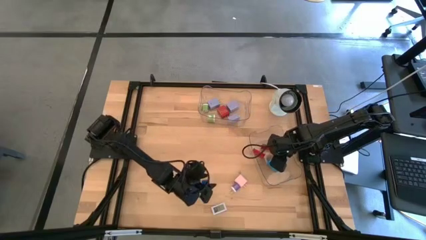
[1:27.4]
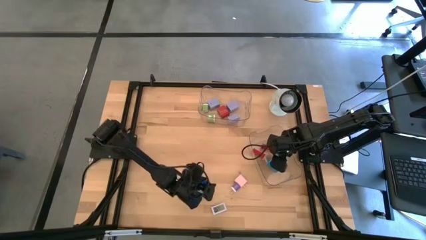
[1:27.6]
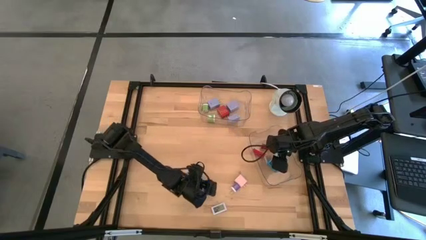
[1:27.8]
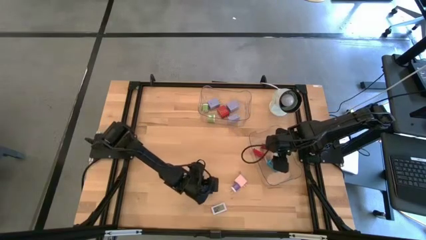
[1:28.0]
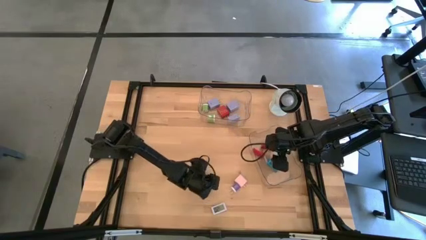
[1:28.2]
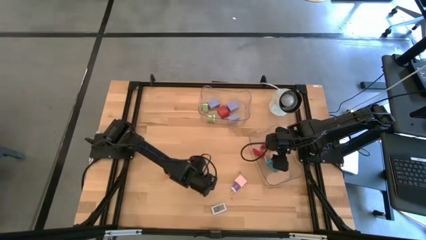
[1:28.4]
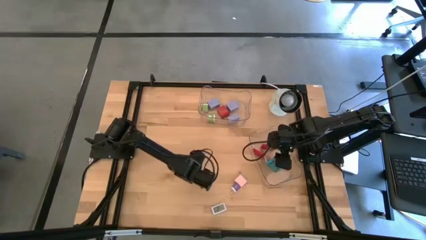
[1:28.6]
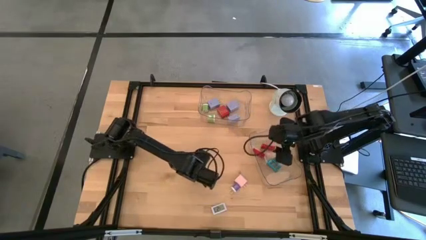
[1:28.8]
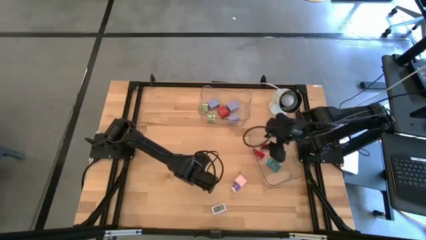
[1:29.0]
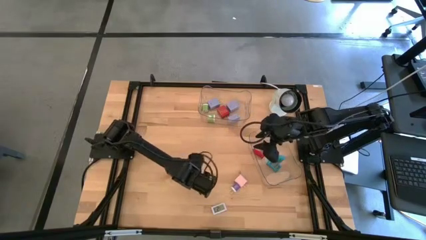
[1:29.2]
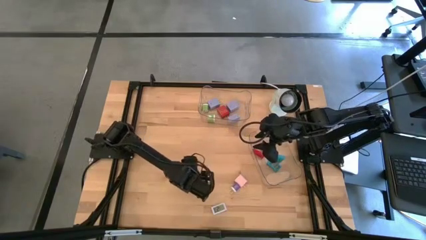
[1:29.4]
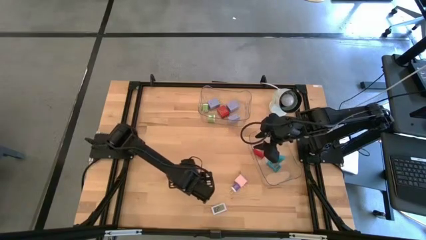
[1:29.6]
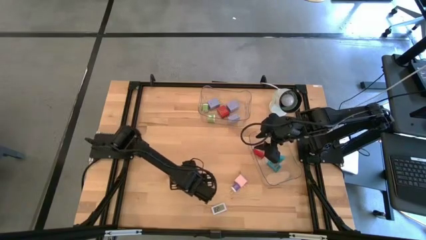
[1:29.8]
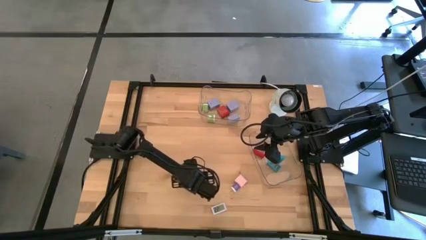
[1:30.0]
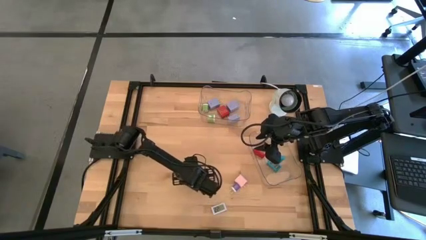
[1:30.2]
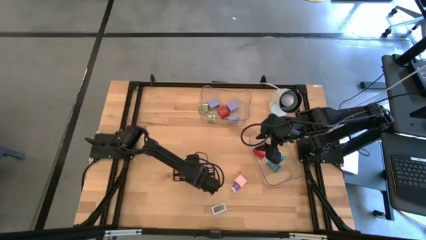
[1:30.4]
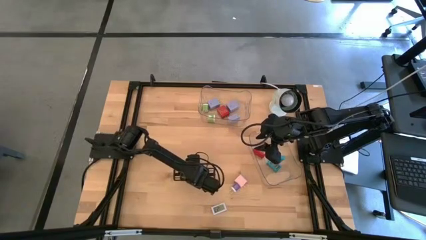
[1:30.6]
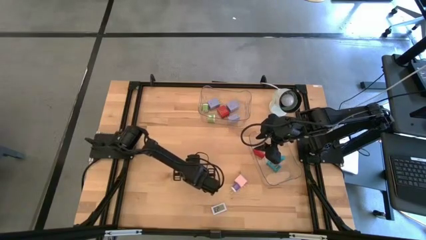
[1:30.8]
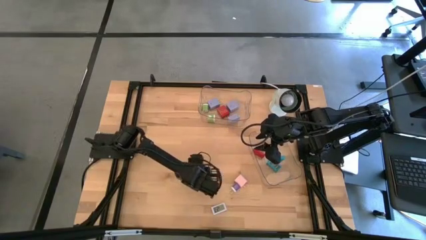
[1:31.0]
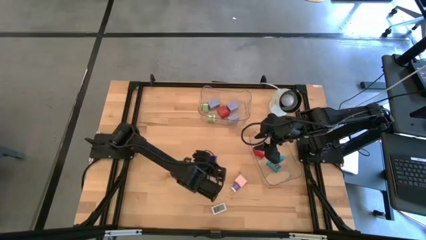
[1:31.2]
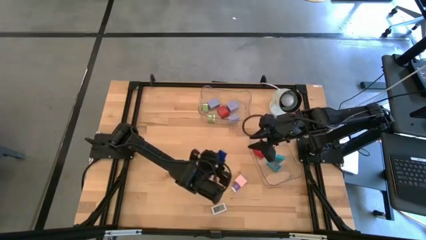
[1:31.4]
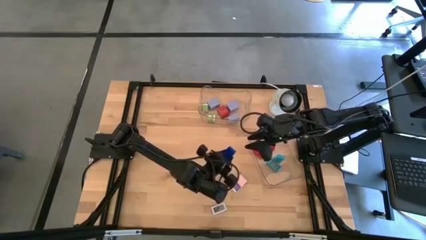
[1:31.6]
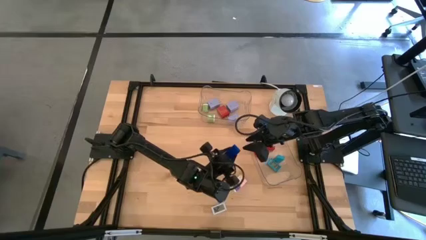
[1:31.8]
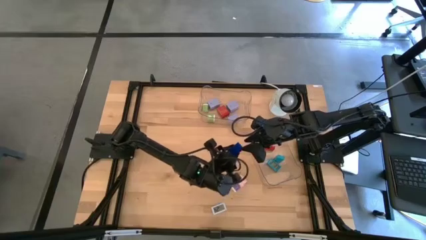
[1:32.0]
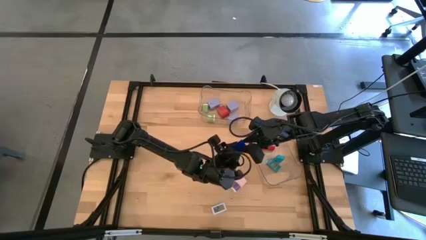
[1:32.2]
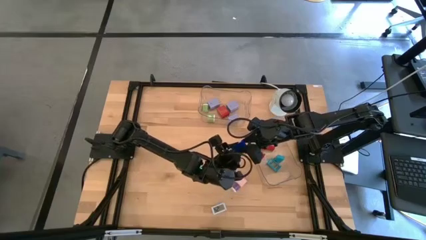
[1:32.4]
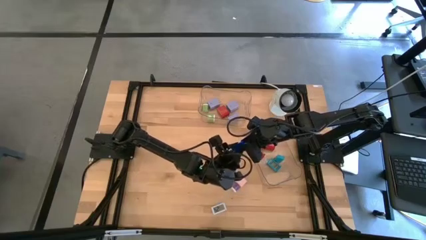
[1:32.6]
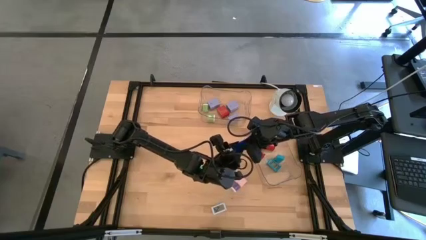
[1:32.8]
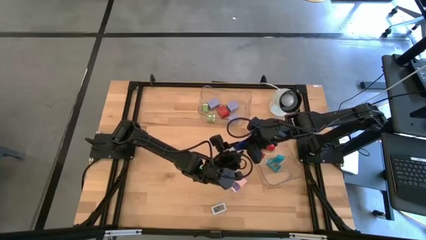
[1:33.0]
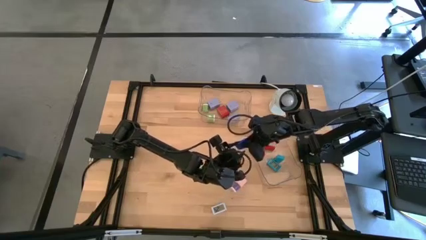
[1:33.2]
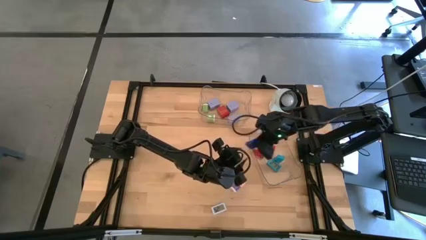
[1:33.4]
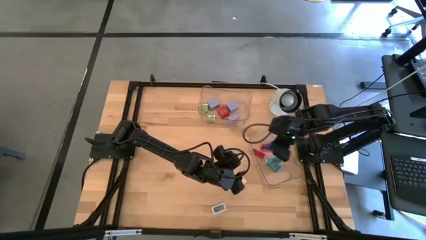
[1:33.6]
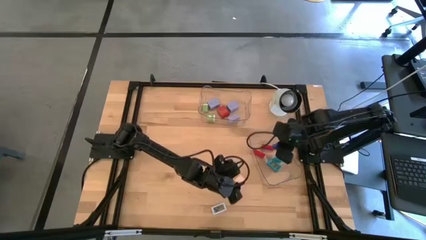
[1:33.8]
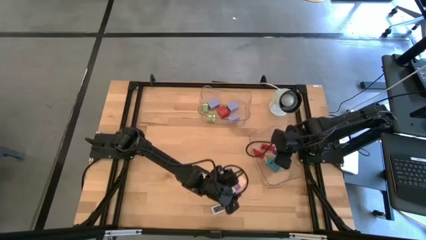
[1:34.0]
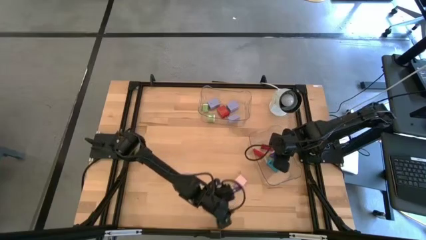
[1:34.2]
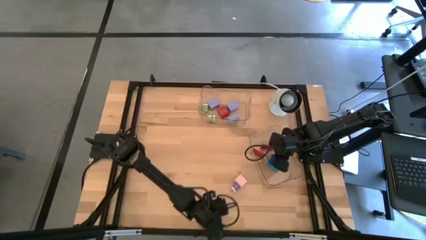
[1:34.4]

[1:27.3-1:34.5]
Task: Pick & Place Office items
Put the blue digital clock into the bottom transparent bin

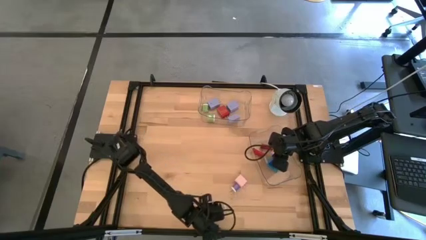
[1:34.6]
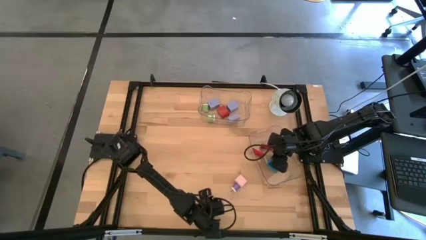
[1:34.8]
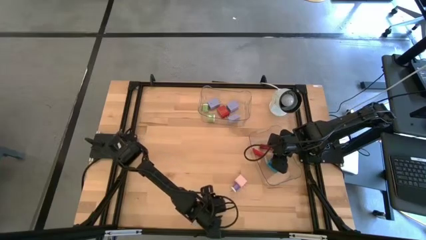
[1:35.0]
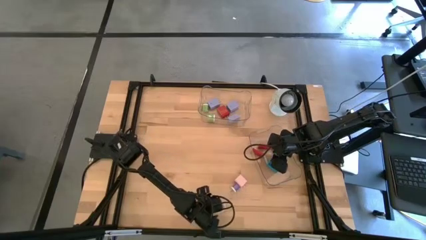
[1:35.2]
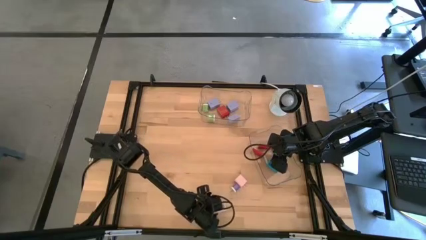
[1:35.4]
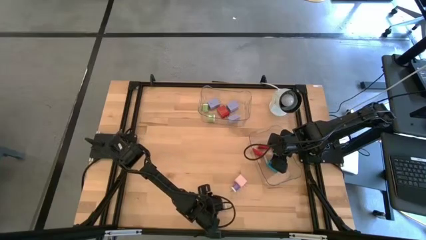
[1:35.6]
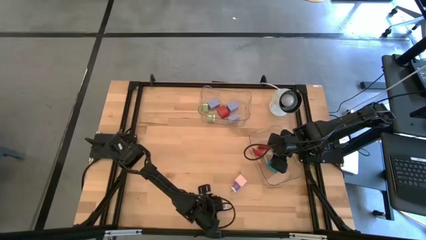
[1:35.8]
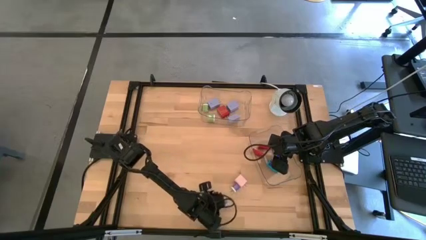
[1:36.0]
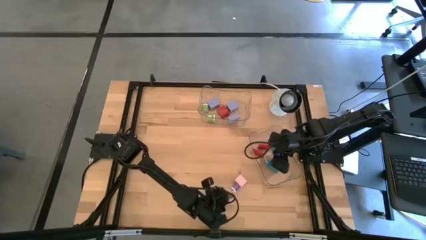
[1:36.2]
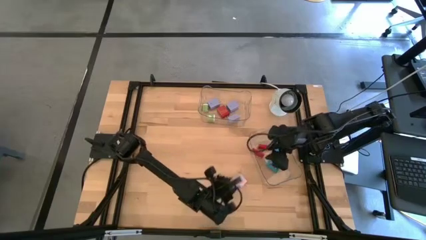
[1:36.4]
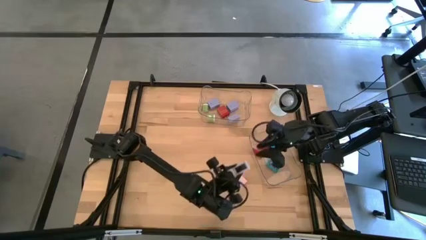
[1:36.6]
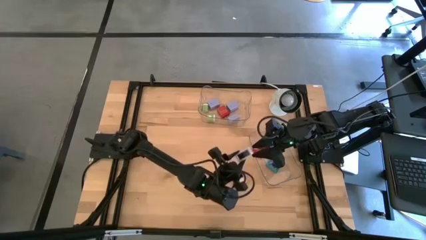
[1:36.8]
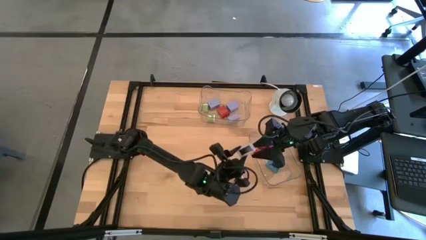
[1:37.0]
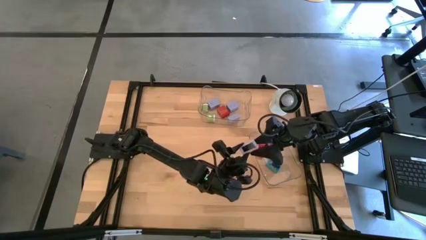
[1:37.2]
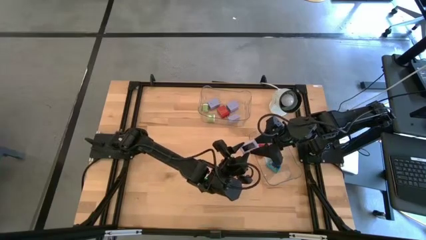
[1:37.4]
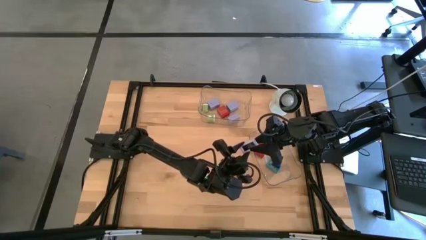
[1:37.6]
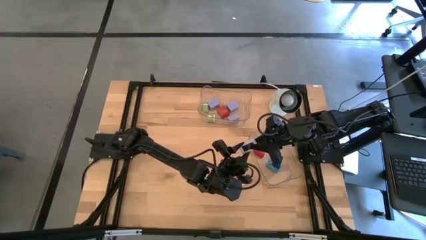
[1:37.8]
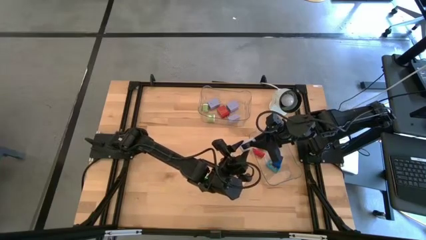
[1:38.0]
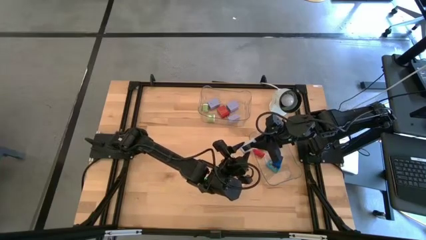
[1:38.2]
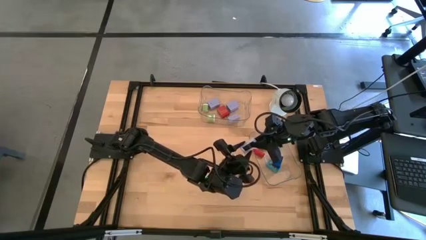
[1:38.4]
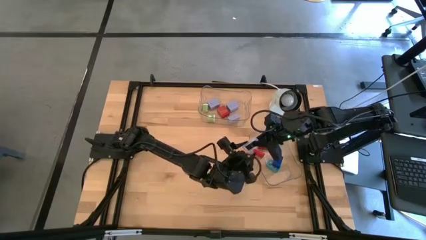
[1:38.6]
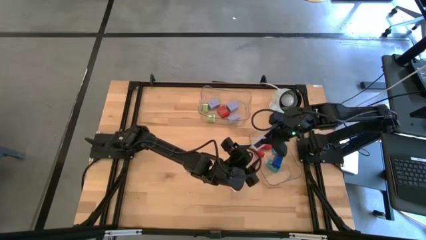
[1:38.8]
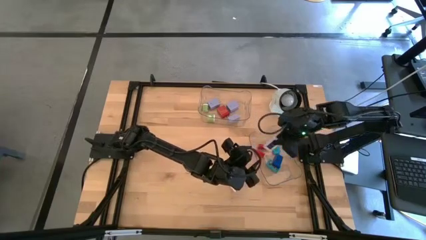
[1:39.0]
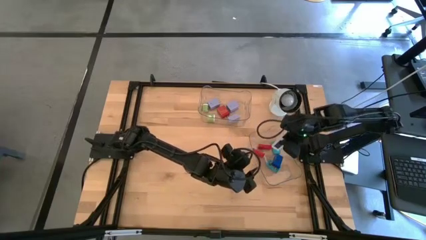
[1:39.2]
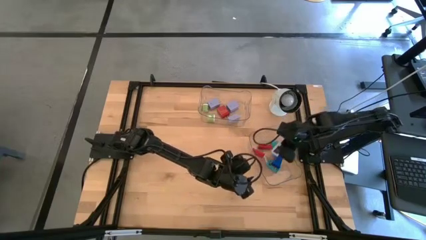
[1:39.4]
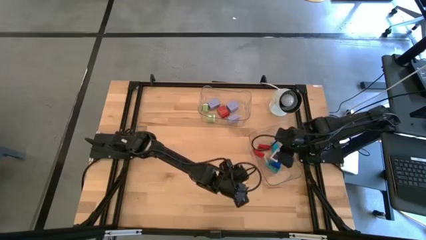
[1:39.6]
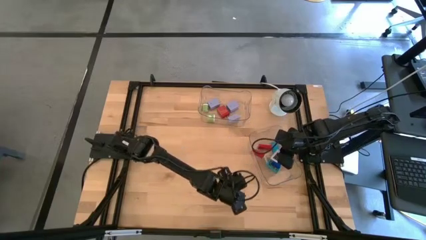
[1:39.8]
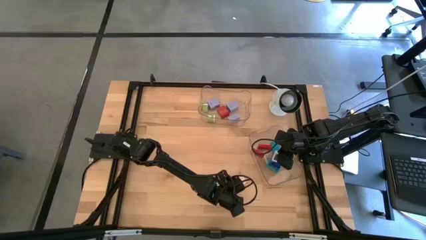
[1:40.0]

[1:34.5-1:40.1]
Put the white digital clock into the bottom transparent bin

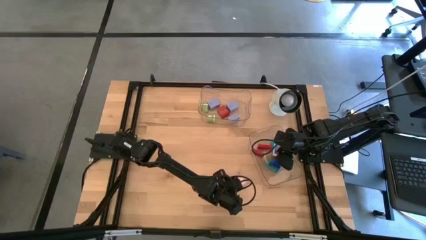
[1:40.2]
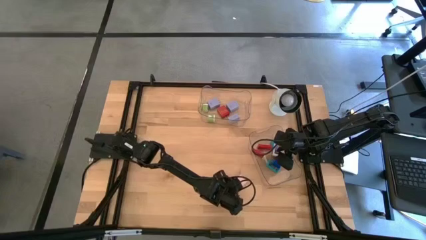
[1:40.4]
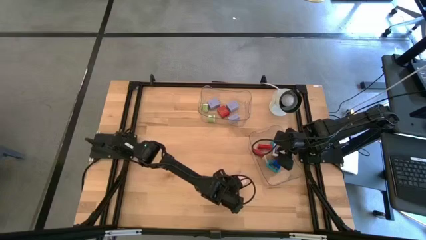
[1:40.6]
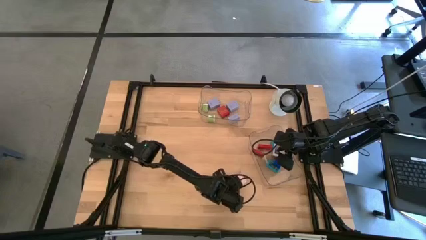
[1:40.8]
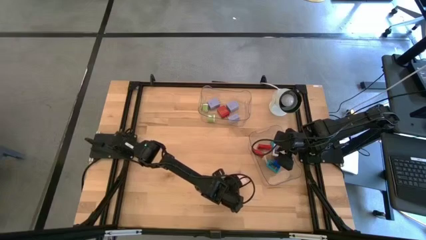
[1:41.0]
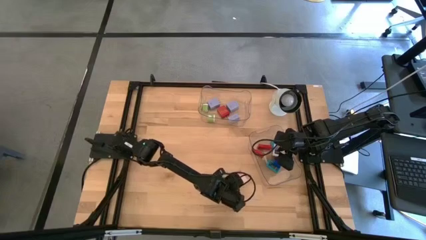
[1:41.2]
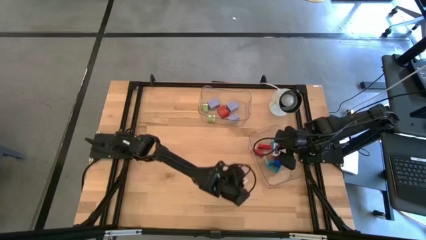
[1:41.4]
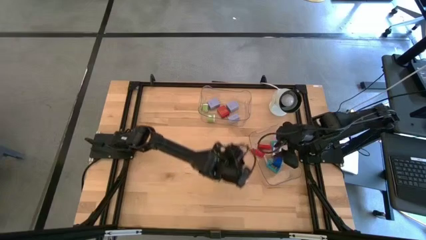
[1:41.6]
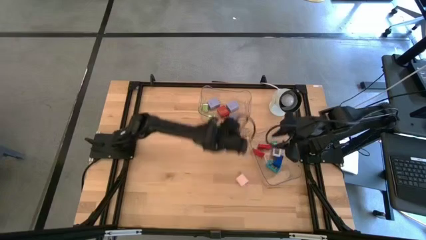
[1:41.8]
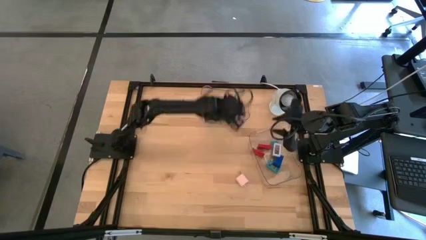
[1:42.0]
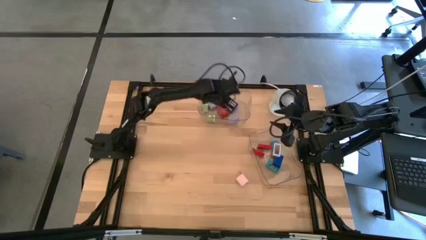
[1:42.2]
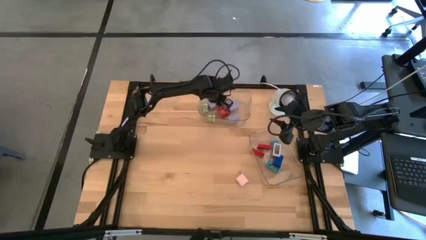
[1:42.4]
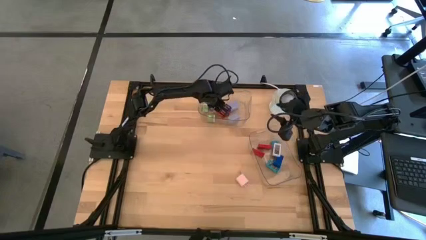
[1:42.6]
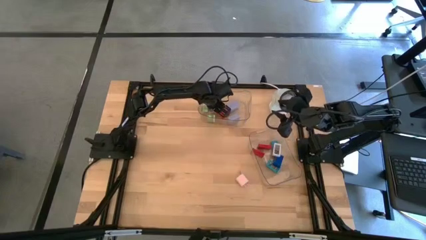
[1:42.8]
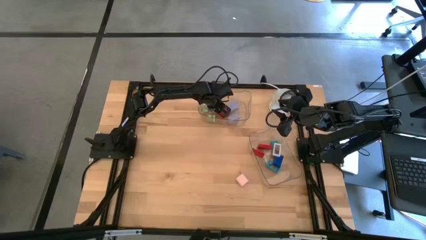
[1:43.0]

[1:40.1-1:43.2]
Put the small purple charger adapter into the top transparent bin
